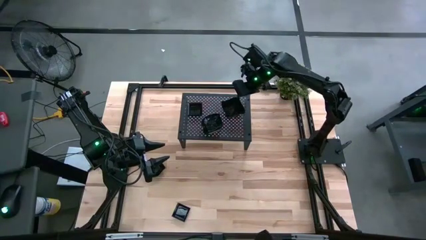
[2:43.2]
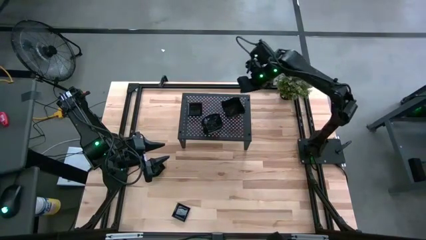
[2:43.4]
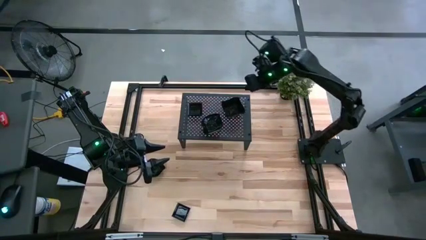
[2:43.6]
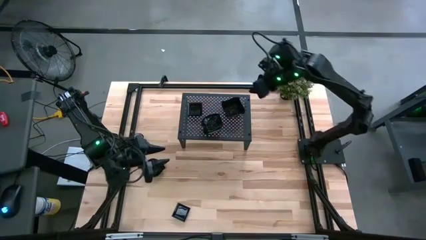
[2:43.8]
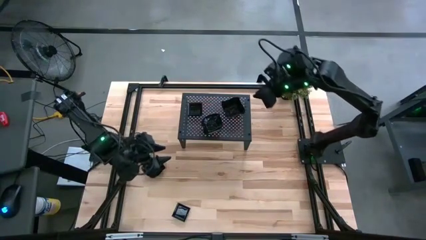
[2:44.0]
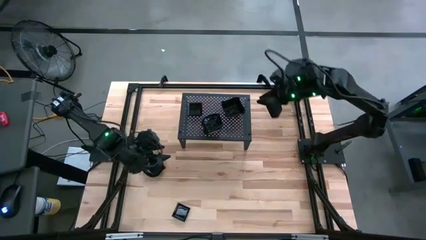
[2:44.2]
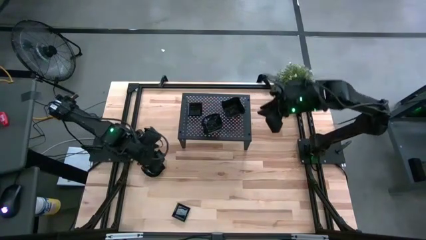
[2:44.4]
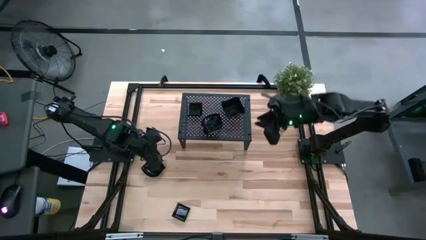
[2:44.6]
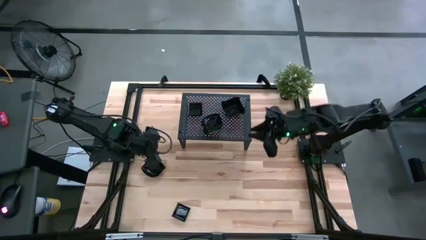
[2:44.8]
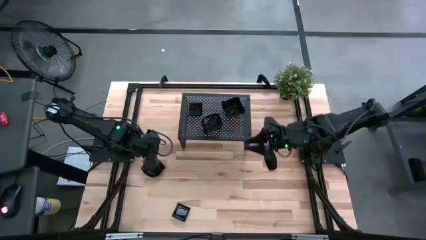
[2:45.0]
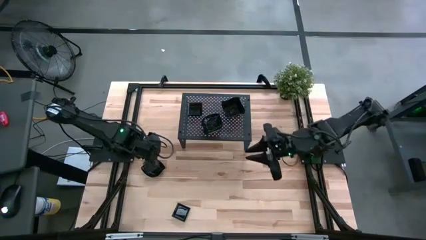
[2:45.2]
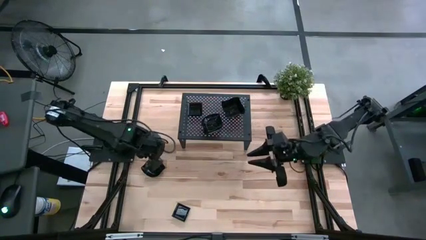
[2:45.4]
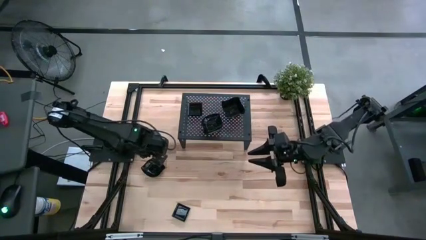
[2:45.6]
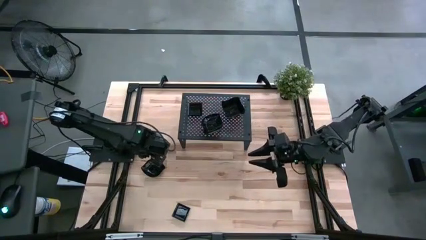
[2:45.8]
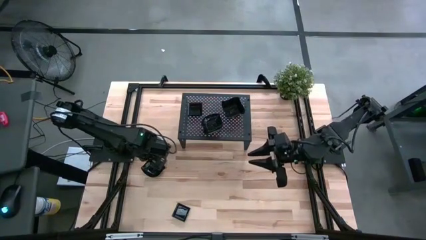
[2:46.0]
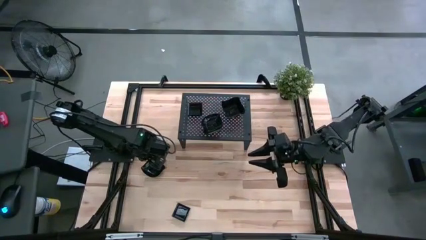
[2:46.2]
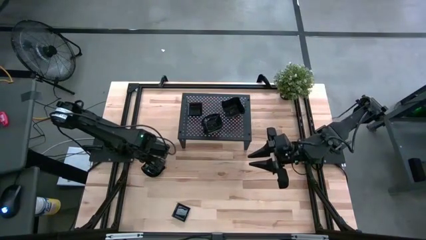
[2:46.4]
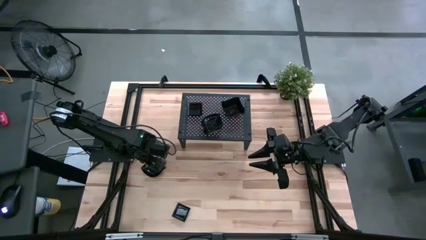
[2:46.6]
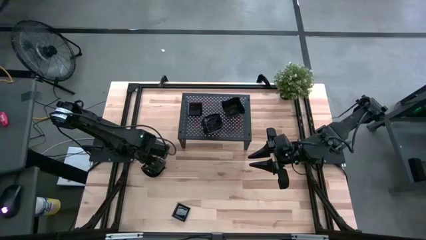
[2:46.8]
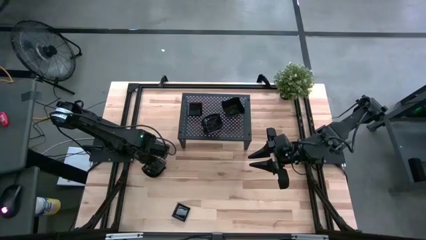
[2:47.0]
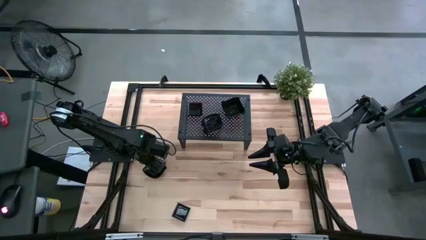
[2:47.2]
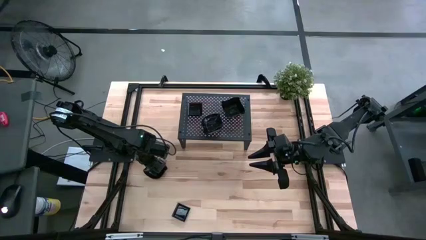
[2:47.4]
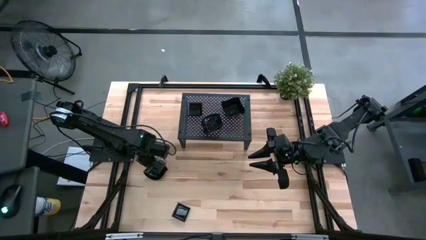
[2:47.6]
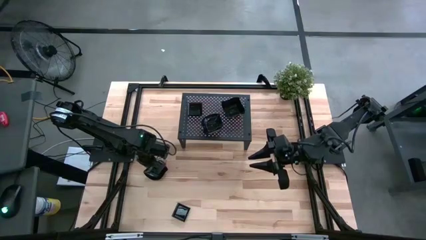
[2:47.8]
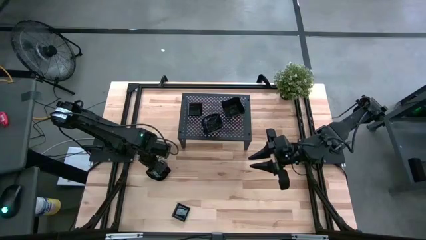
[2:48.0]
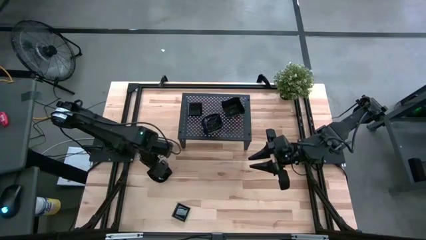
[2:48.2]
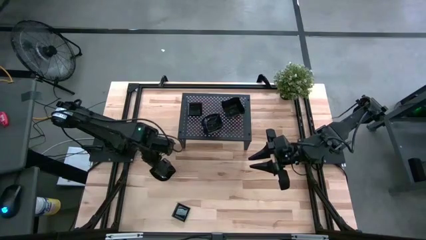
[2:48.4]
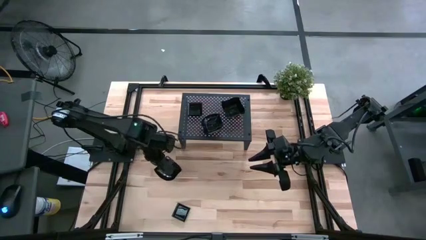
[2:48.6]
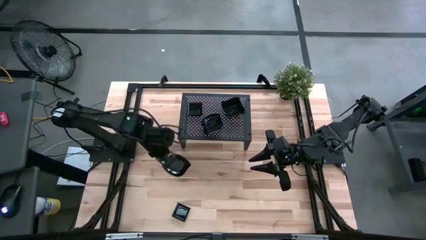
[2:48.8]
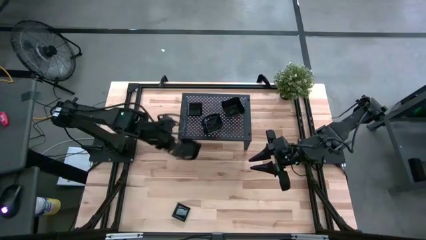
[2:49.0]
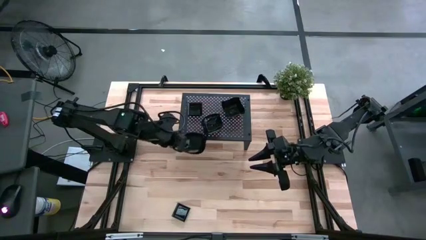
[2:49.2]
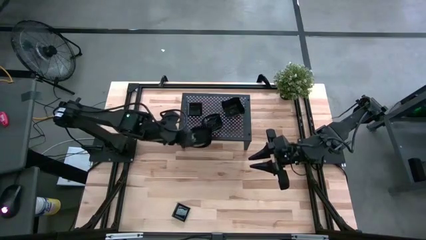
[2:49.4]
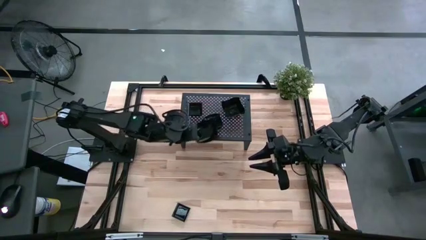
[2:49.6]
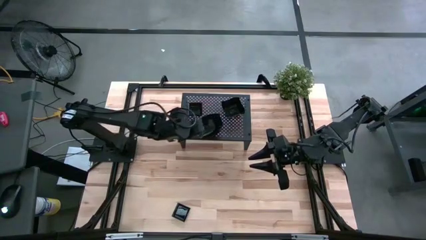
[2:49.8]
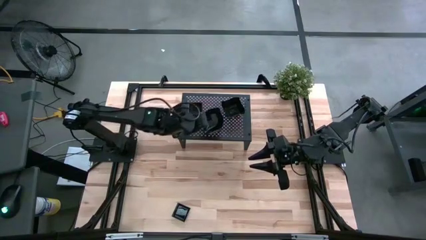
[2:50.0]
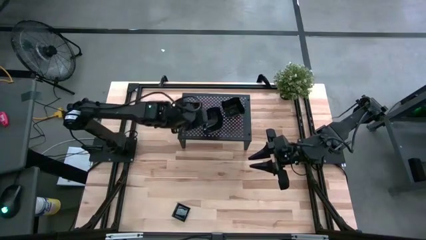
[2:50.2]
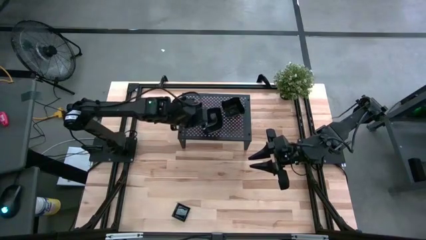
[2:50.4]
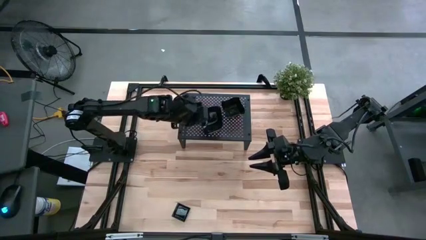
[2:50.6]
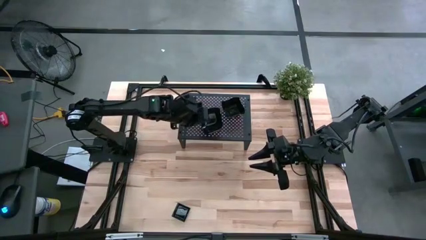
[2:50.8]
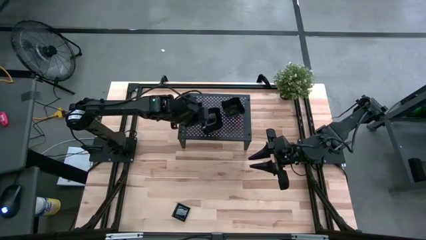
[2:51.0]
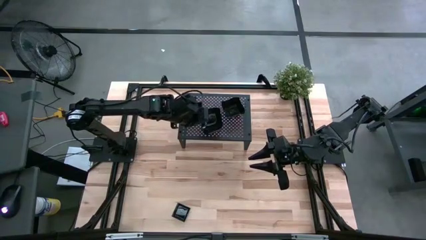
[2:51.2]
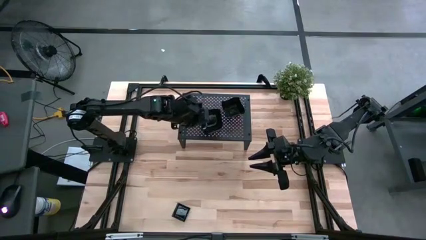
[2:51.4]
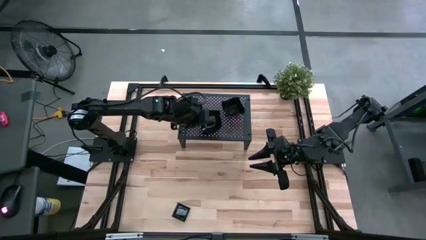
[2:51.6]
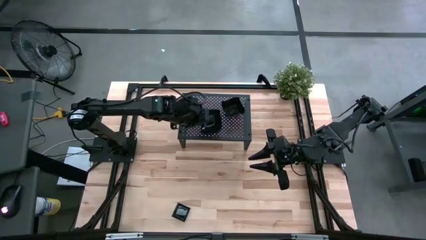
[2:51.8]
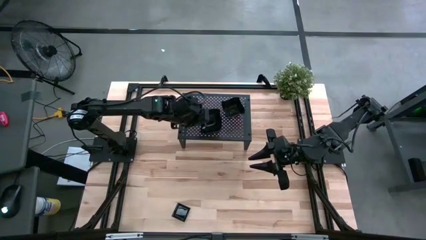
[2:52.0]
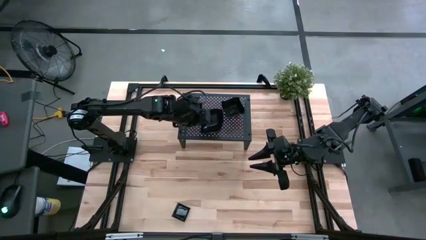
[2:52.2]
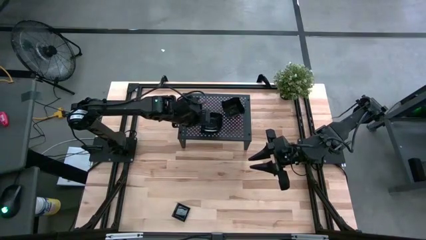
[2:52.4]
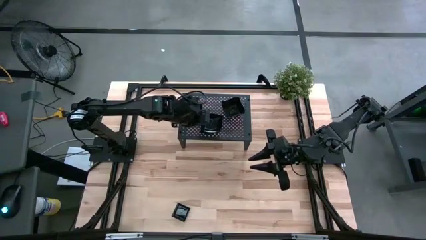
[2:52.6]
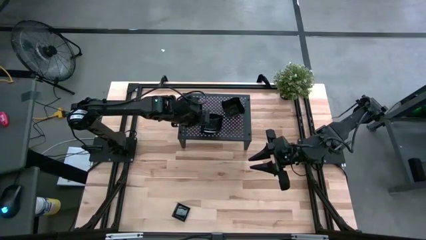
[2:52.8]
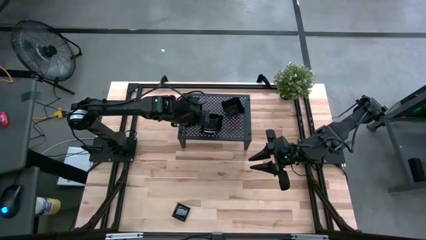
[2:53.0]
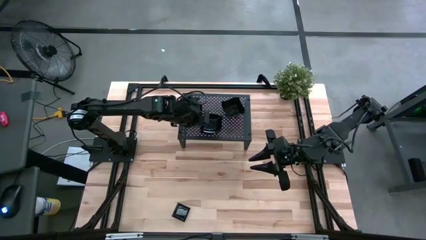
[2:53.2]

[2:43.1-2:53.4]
Task: Pick & Place Mini shaped plates
Stack the black leaf-shaped plate on top of the black leaf-shaped plates on the shelf
